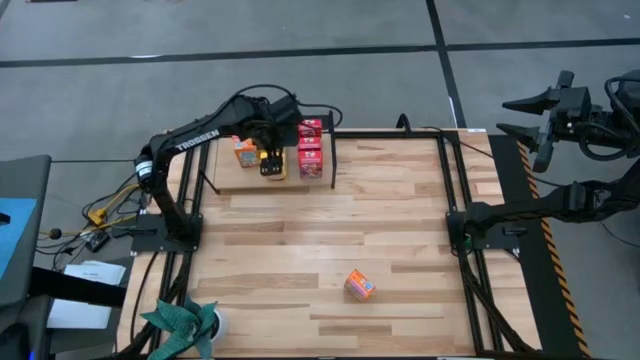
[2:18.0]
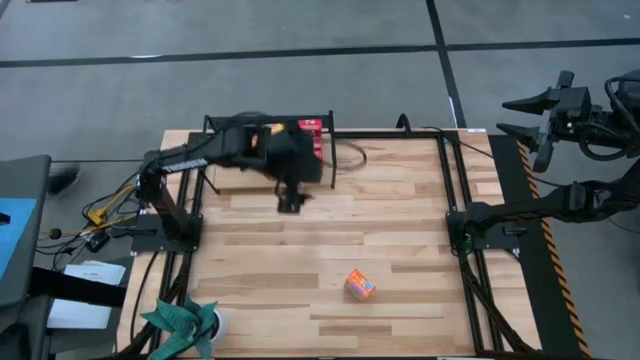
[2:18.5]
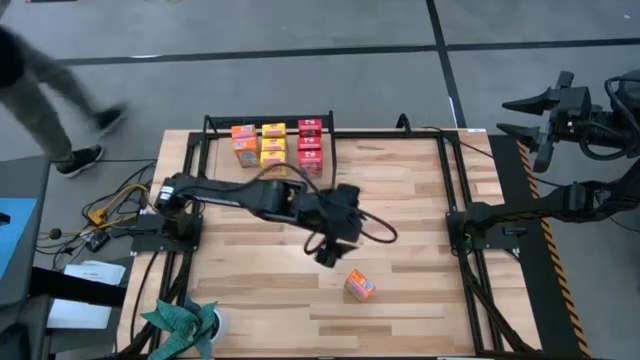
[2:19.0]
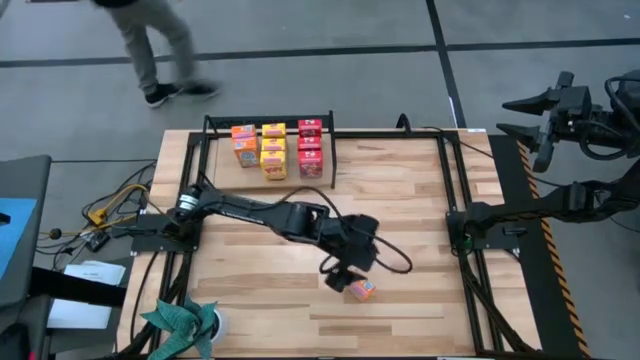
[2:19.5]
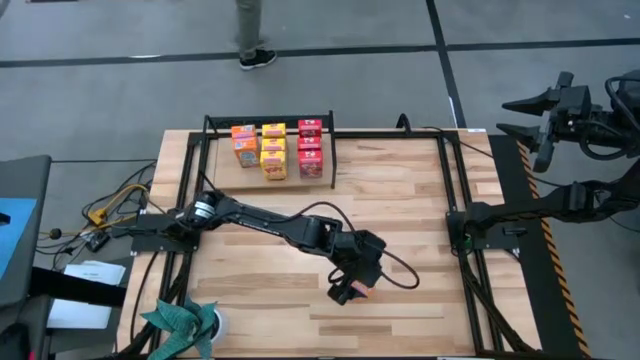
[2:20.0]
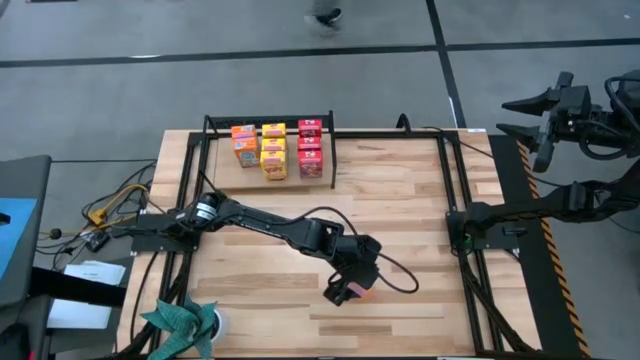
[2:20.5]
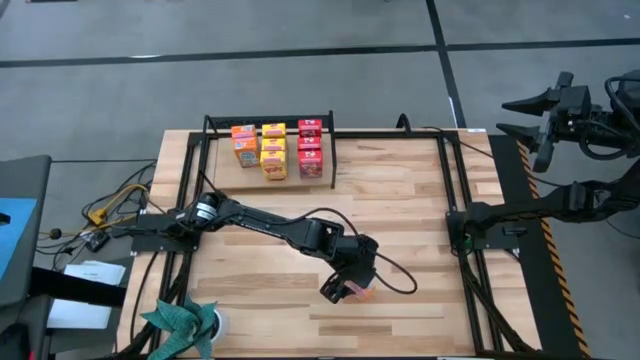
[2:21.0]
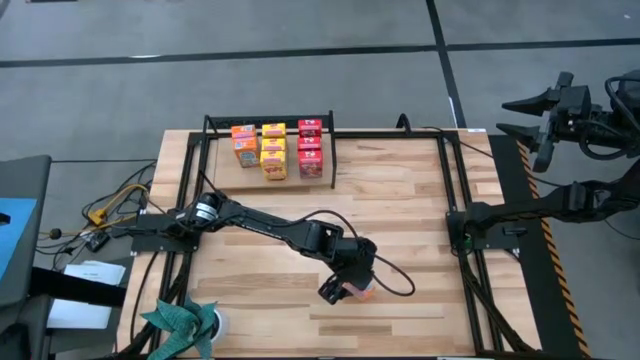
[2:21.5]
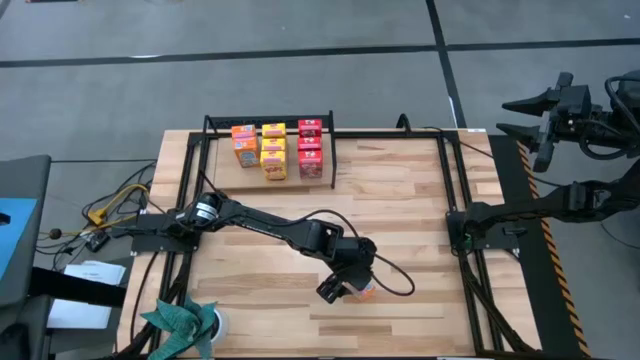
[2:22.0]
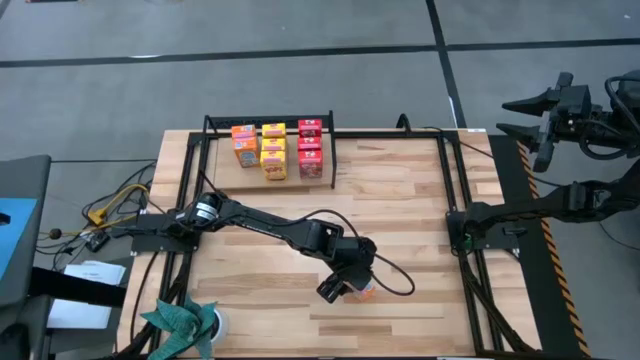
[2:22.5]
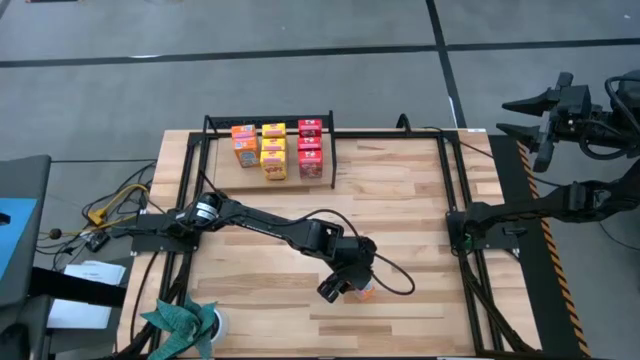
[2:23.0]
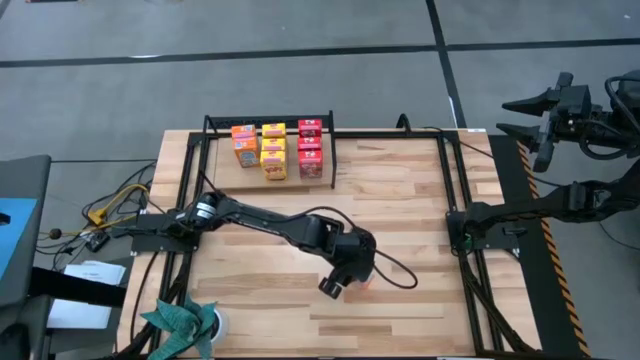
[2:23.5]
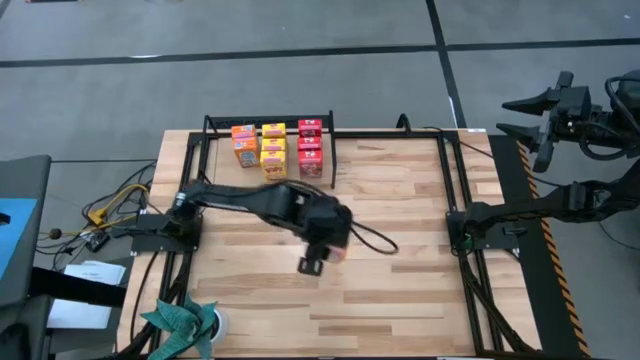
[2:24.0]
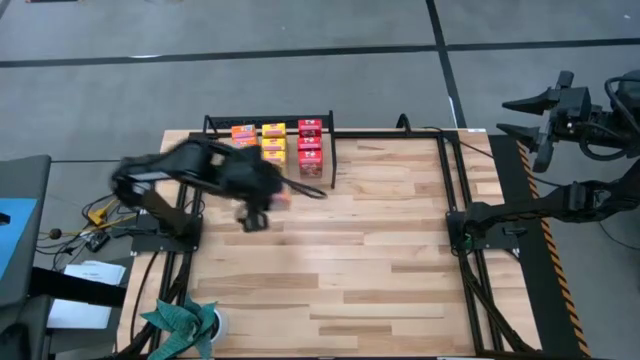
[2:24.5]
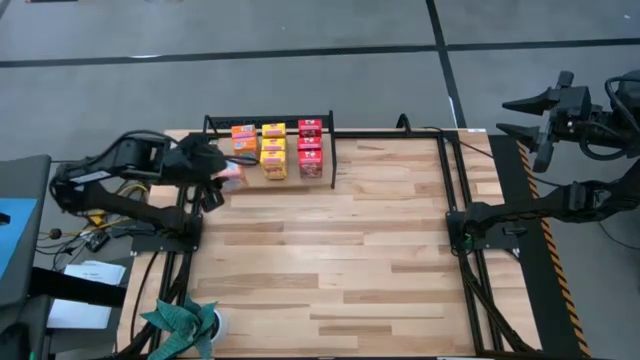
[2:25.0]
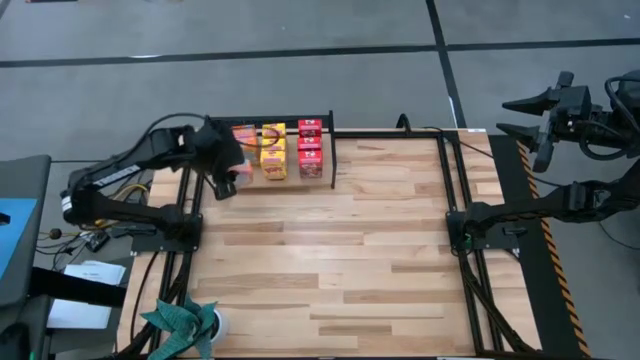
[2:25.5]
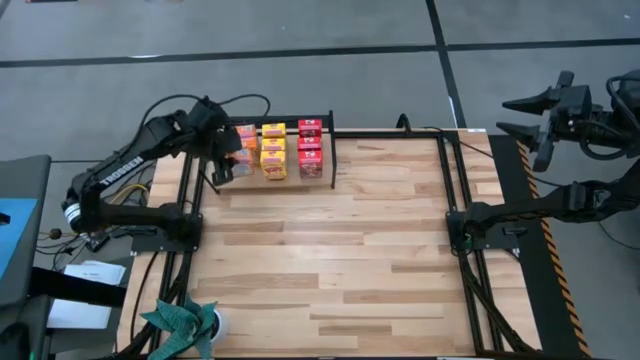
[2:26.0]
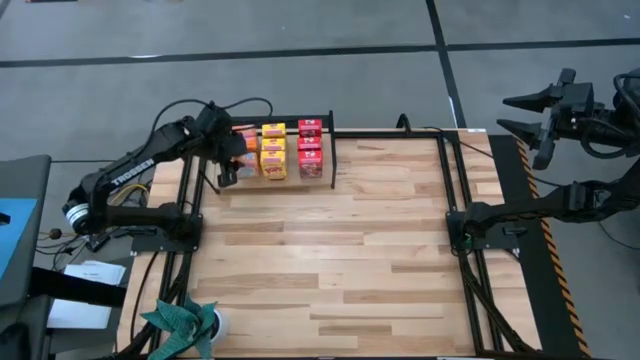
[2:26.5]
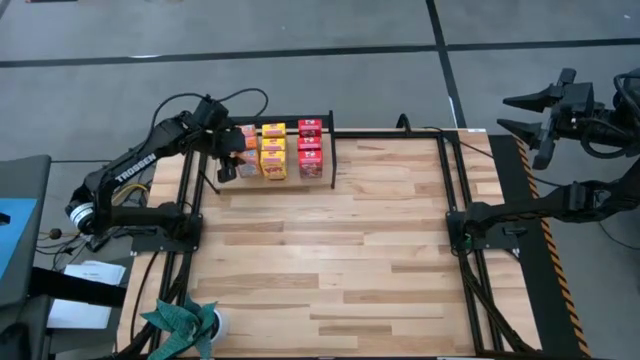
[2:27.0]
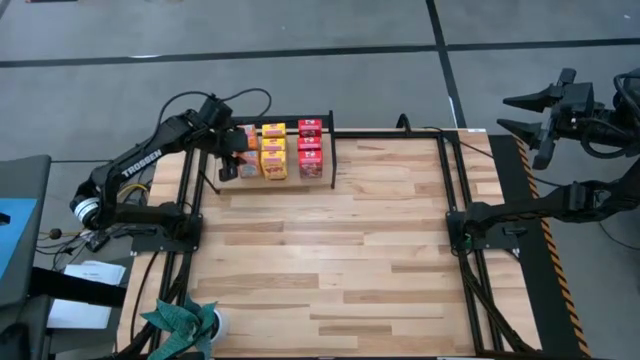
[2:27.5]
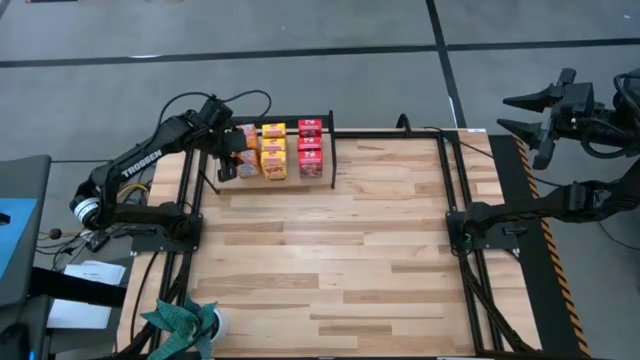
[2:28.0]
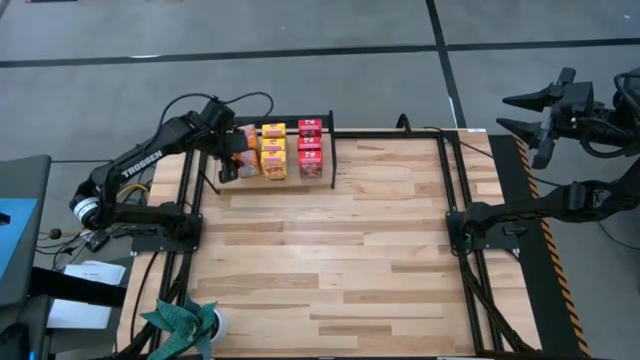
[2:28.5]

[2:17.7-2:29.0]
Task: Stack cereal on shelf
Put the orange cereal box on the shelf aligned with the other orange cereal box

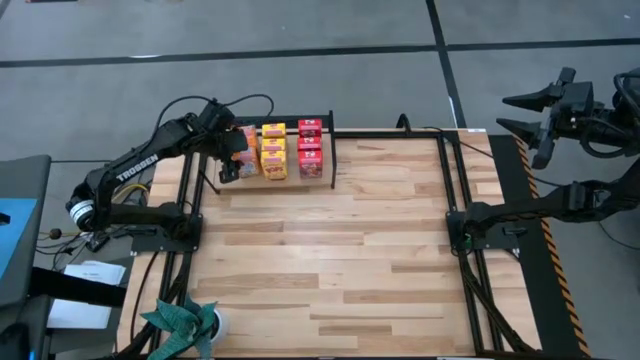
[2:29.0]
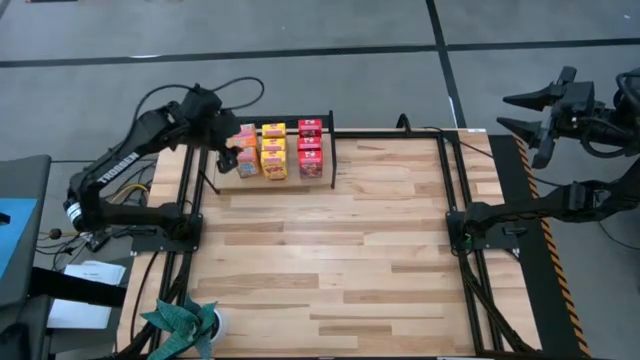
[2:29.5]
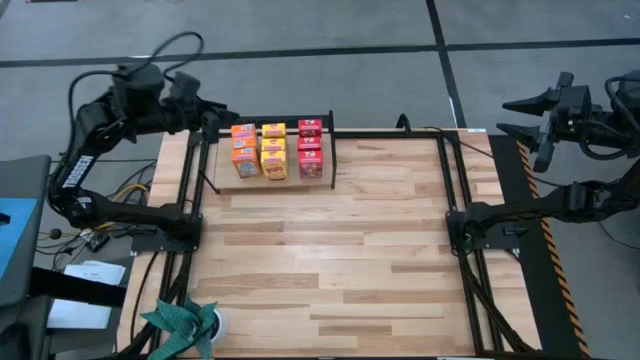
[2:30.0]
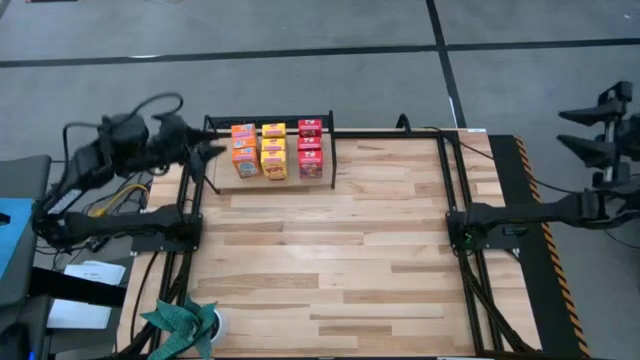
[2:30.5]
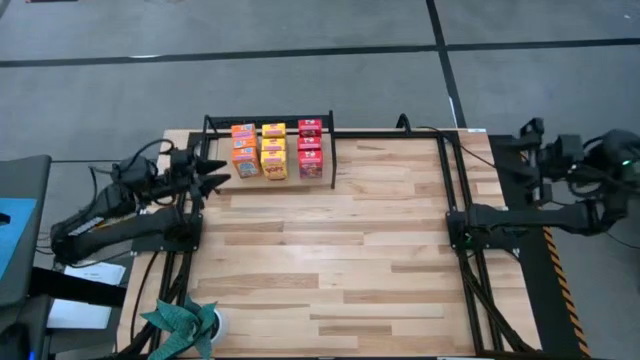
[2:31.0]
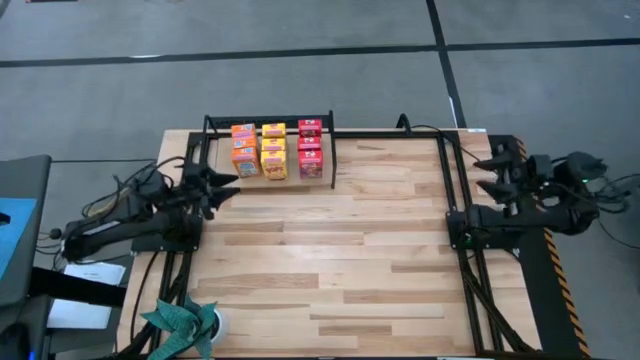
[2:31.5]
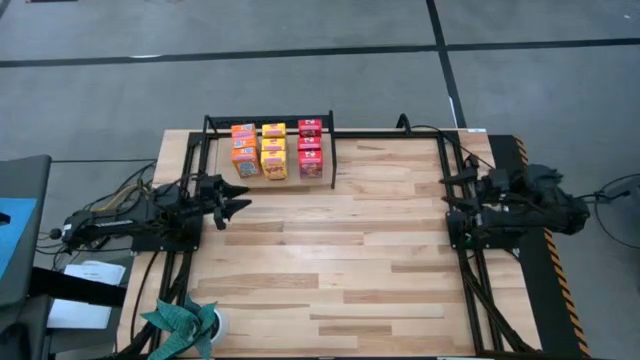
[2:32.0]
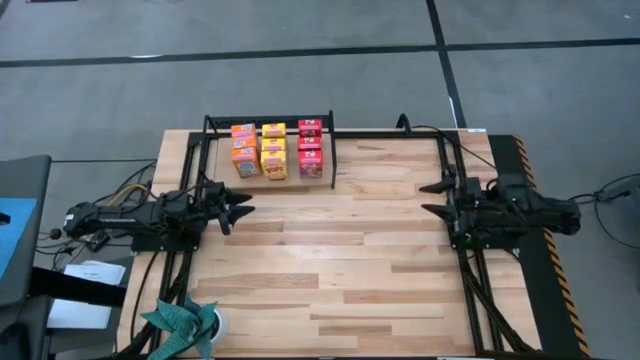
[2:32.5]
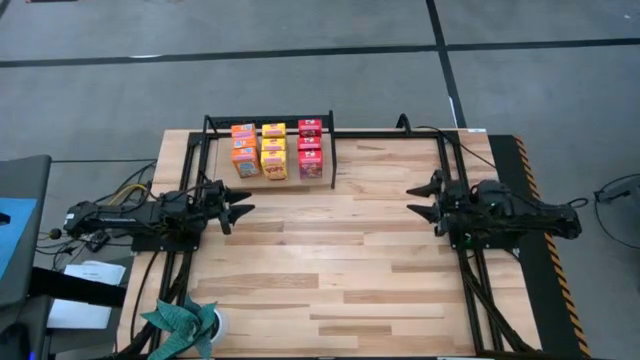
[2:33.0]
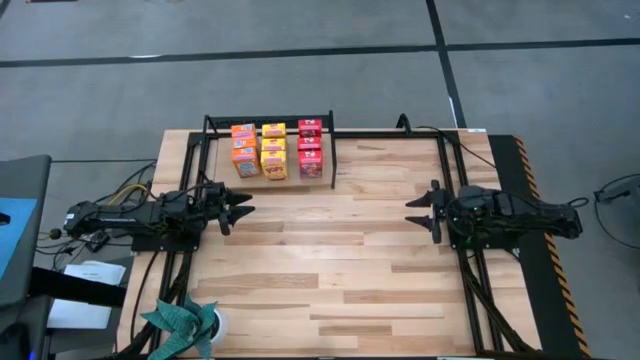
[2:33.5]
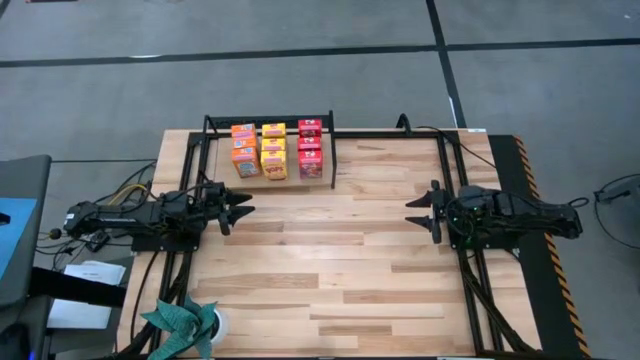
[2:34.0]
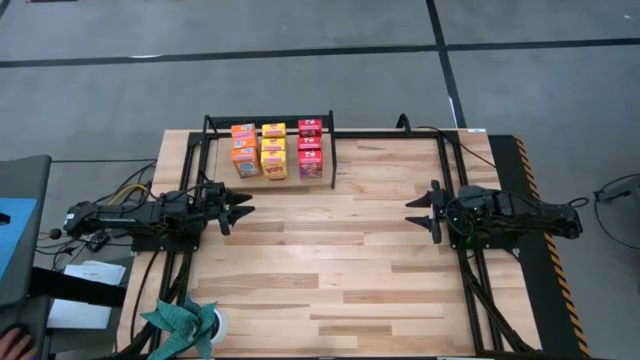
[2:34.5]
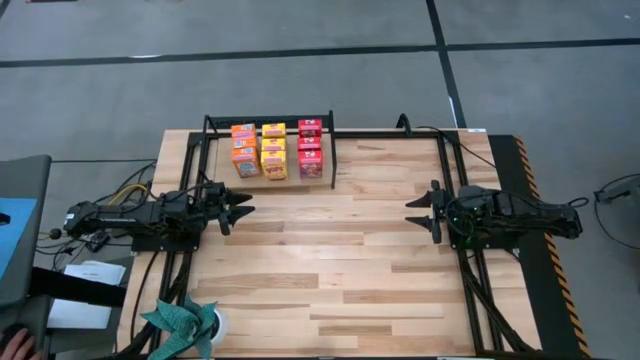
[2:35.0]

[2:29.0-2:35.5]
Return to Home Position

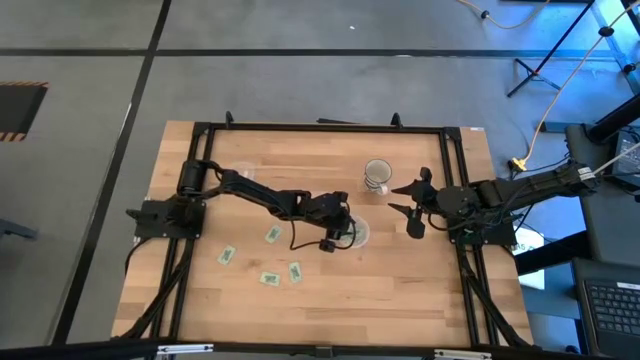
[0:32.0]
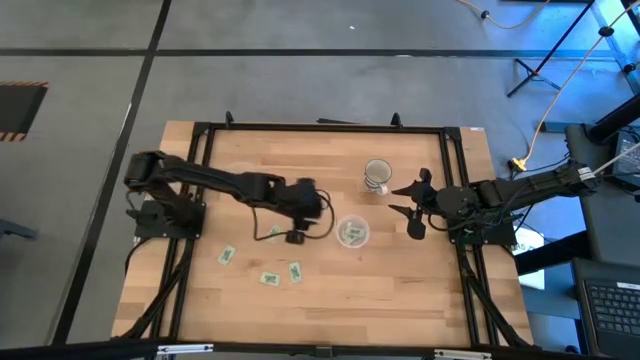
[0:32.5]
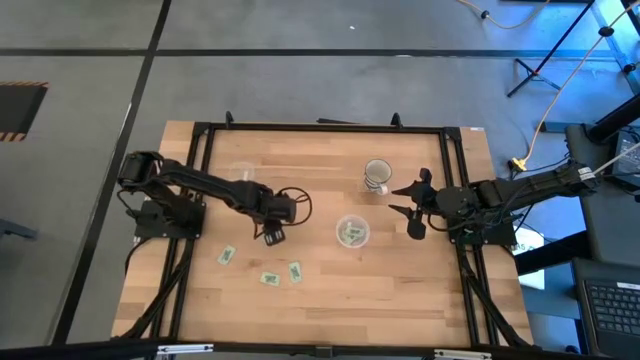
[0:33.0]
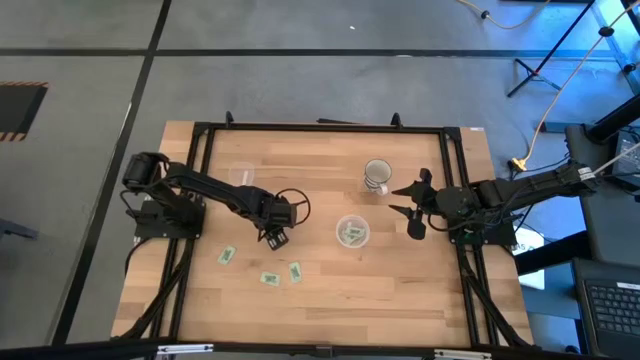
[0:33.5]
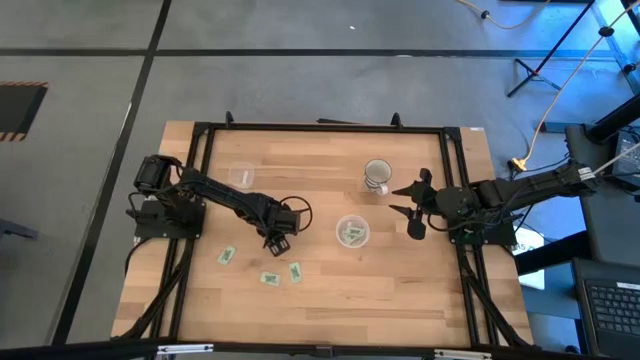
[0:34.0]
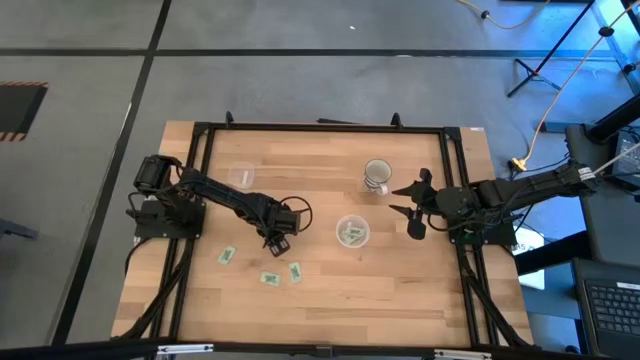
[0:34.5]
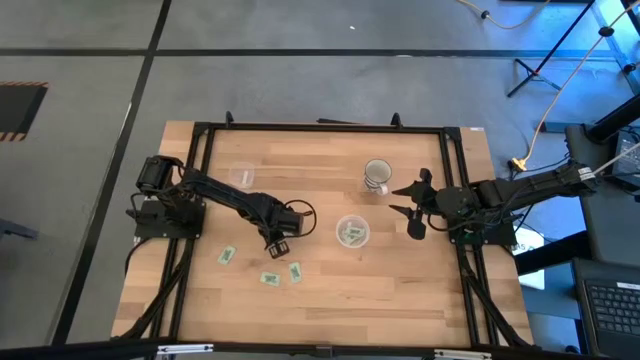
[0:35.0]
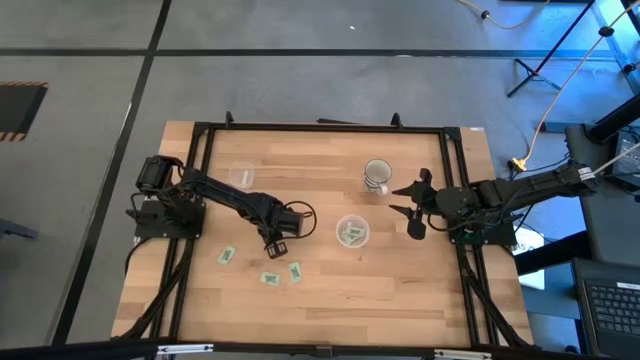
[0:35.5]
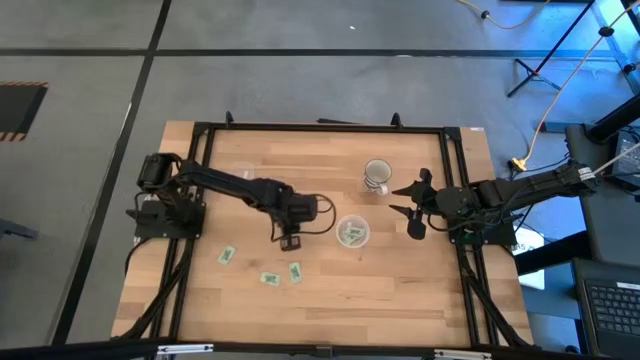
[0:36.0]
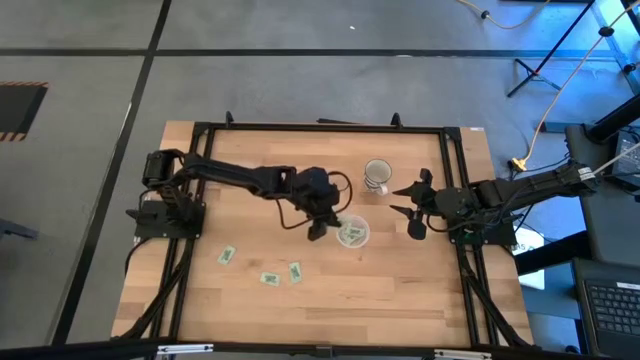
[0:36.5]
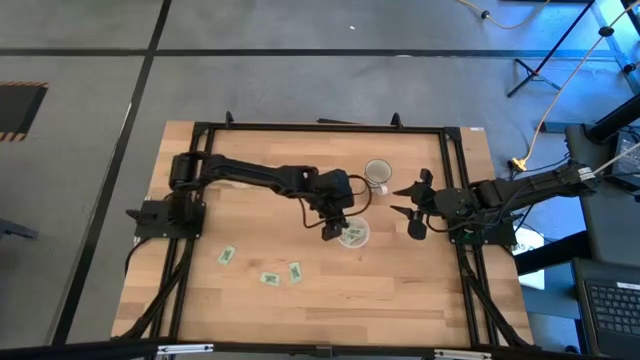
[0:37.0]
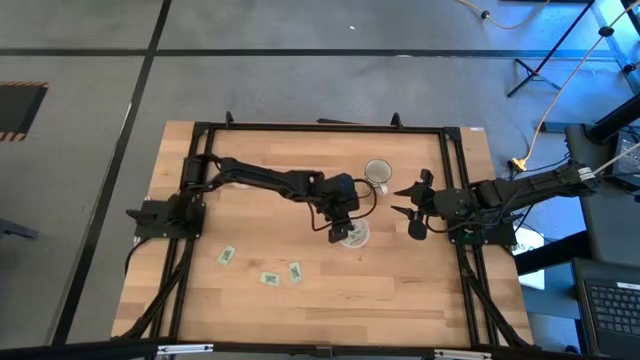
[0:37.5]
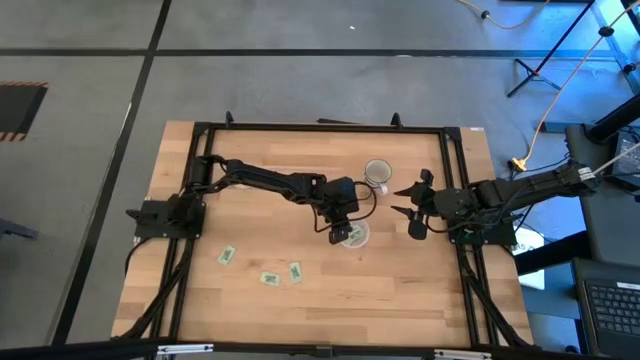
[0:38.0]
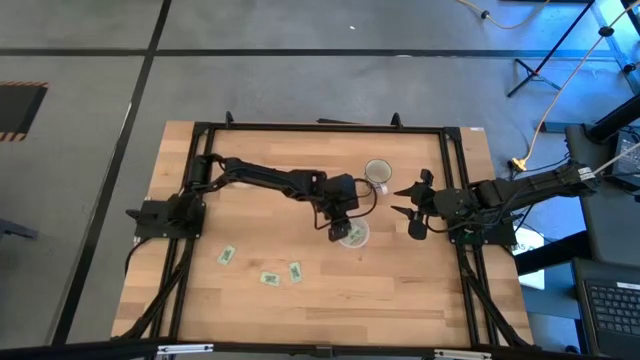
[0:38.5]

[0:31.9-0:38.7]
Task: Pick and place Stevia / Truvia into bins
Put the green stevia packet into the circular transparent container
